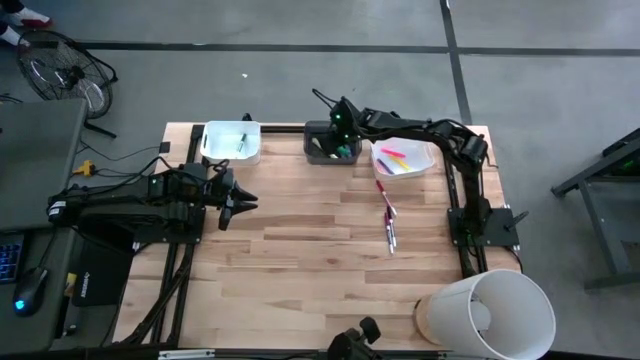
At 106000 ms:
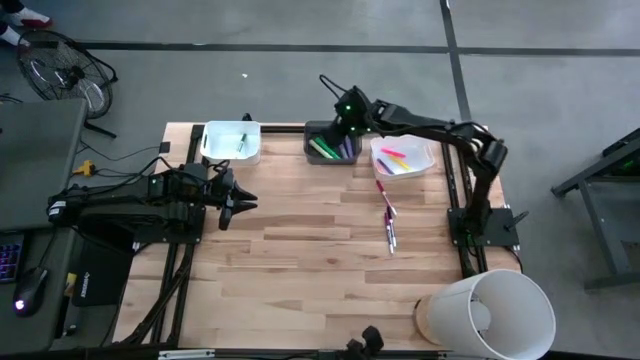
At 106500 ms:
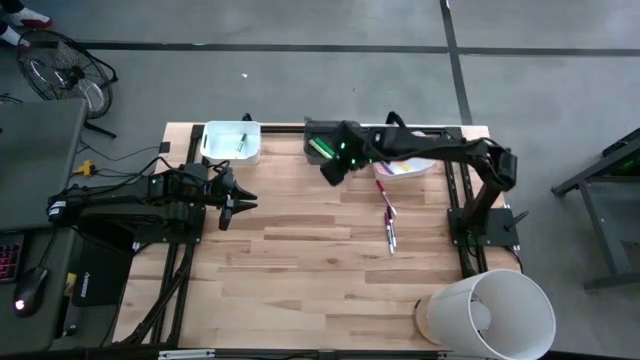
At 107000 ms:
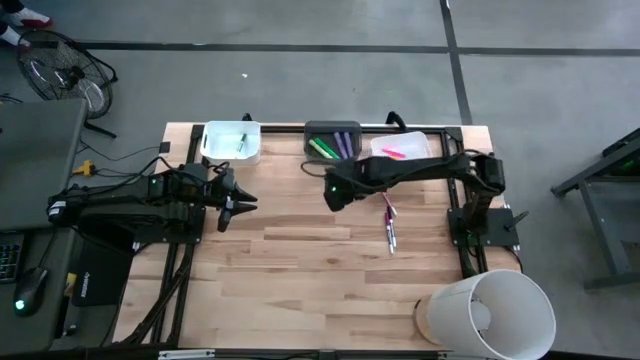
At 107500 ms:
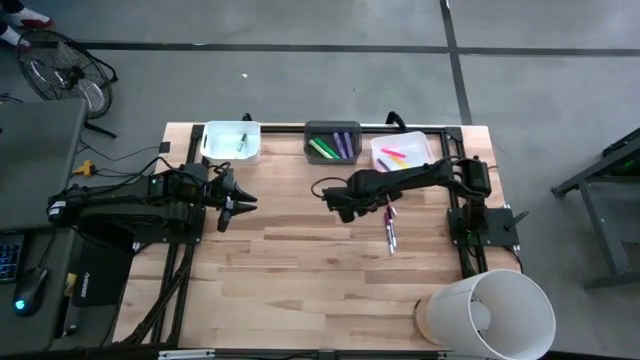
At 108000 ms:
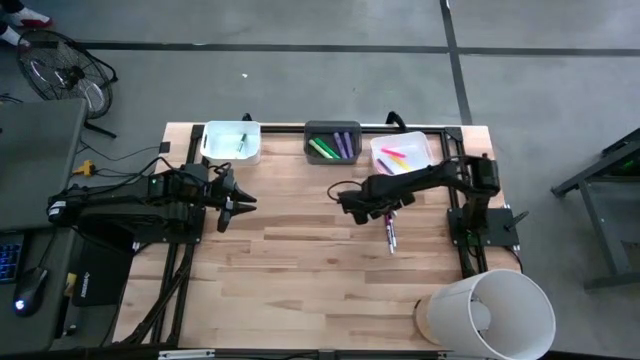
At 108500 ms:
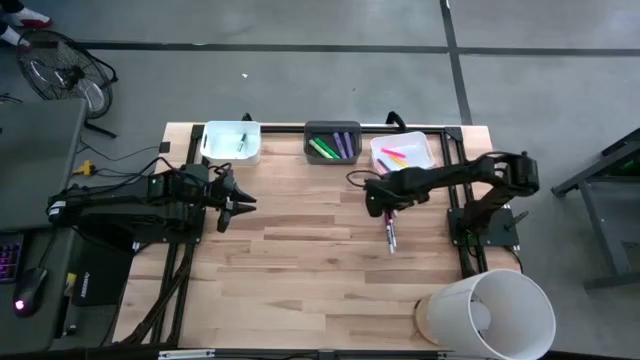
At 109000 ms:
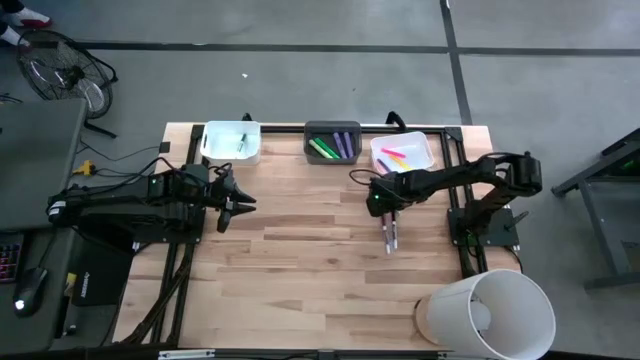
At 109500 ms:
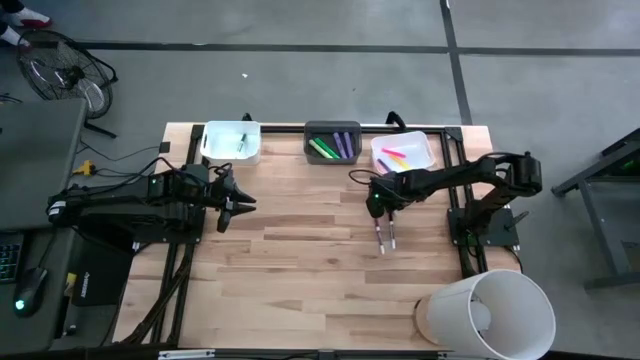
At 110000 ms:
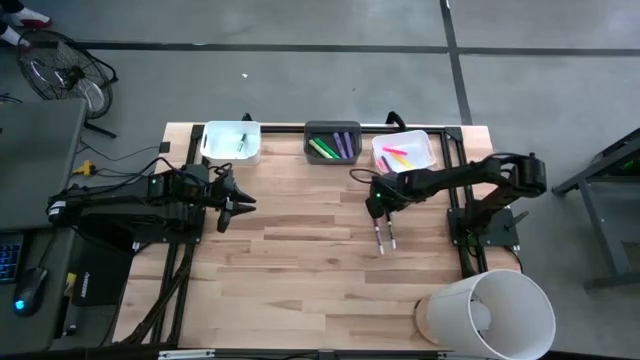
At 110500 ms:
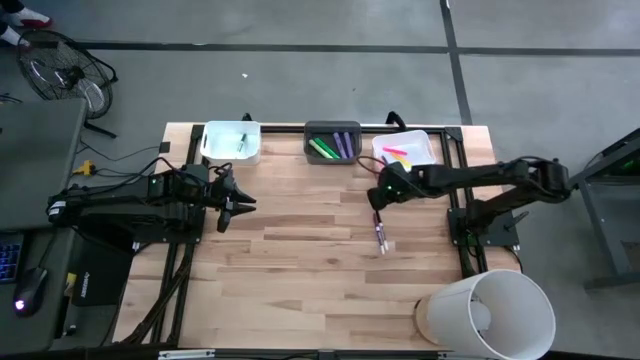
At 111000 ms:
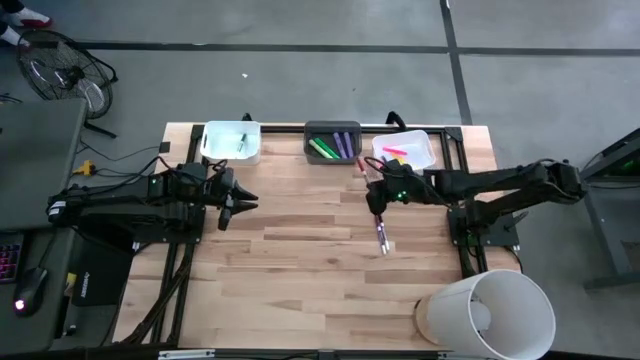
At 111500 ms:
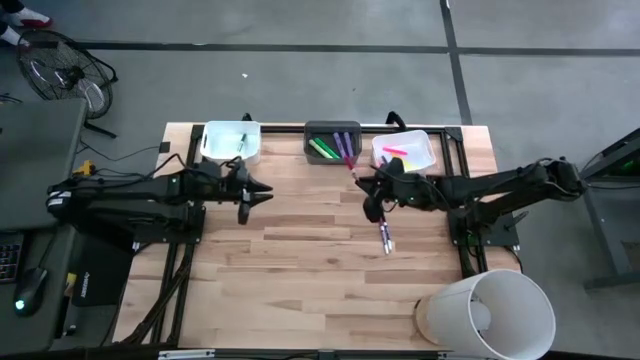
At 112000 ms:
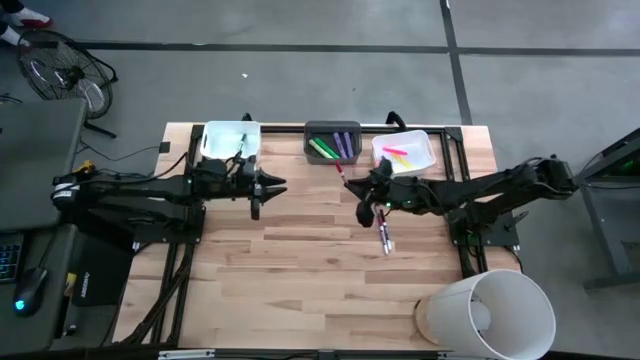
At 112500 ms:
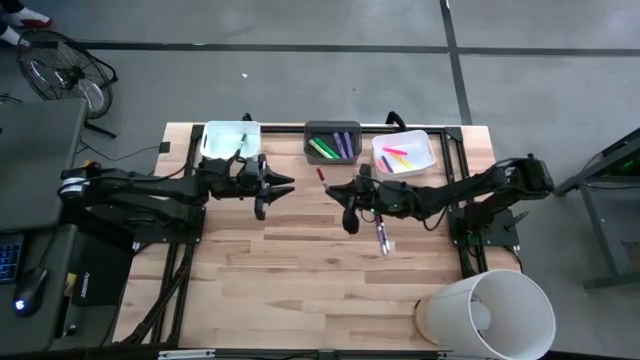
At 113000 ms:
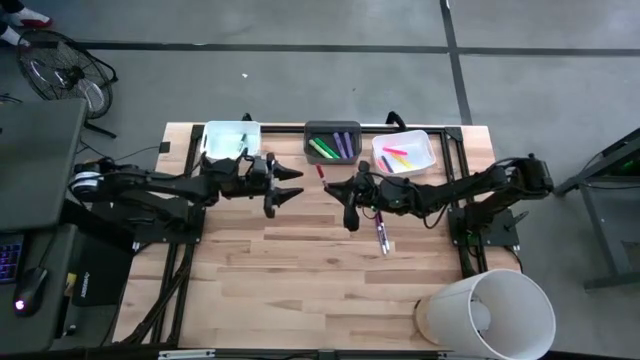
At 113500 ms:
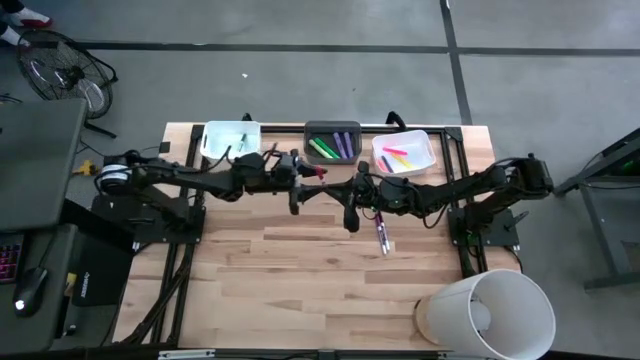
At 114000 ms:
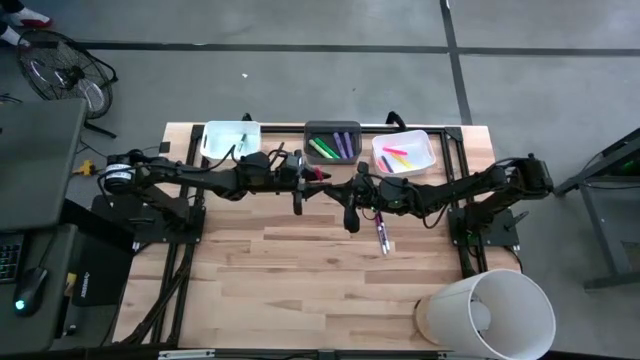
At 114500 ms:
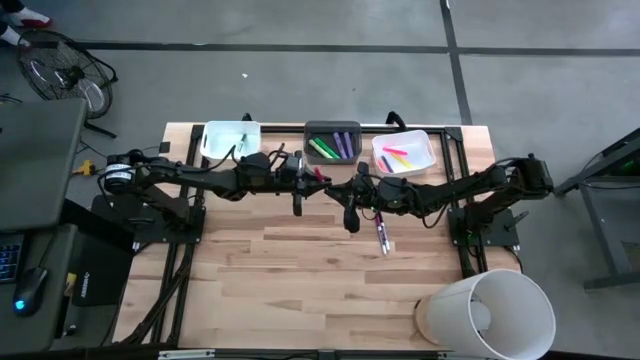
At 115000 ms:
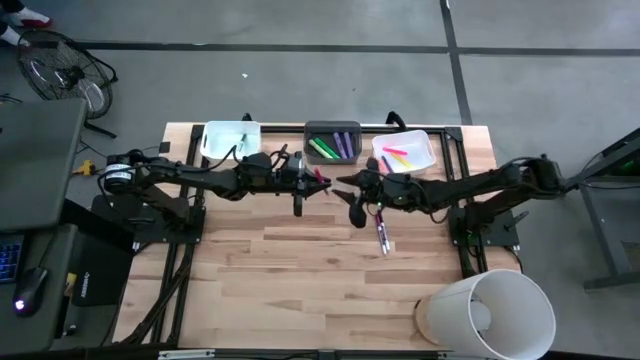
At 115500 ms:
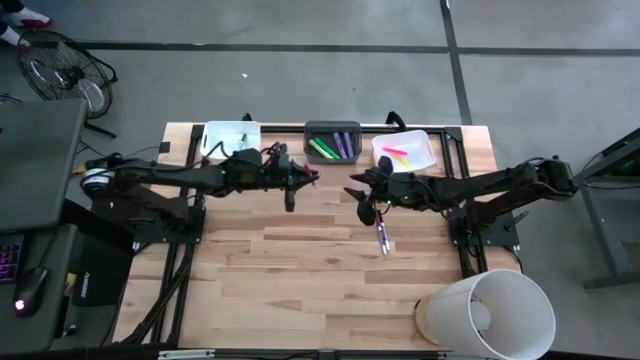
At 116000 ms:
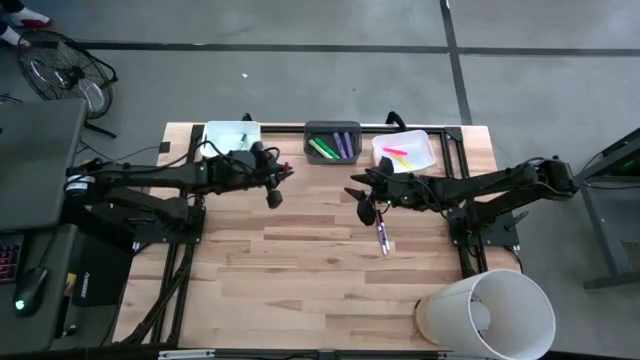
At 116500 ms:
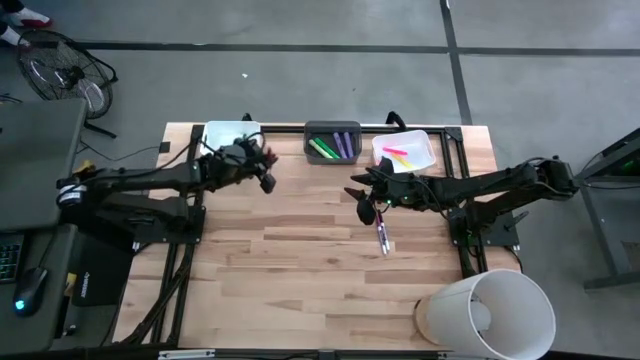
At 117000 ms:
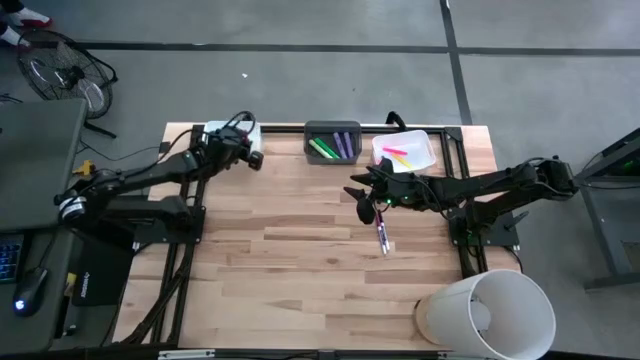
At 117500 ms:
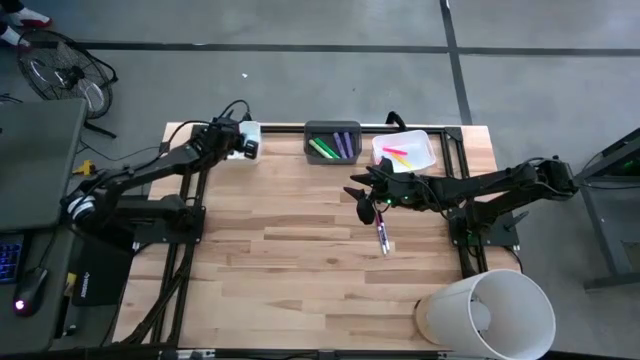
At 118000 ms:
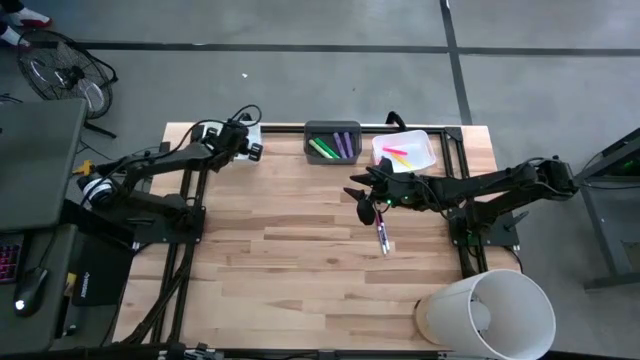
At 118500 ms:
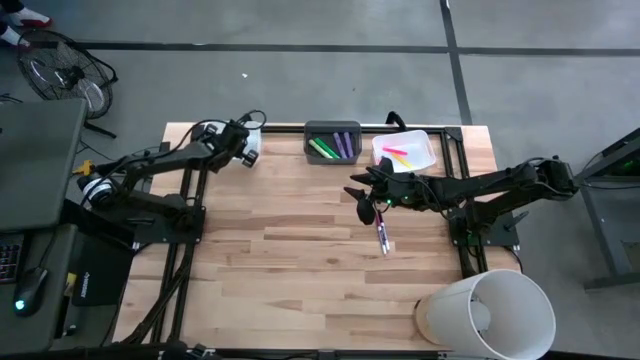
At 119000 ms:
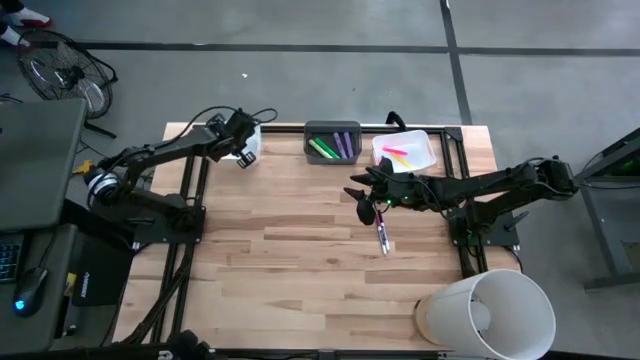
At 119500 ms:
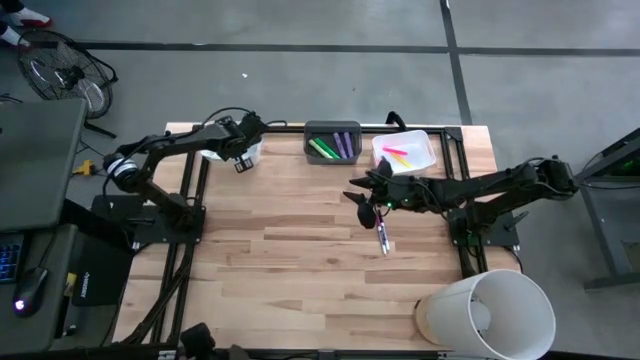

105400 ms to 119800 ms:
Task: Pick & Place Markers
Put the red highlighter pen into the left white bin

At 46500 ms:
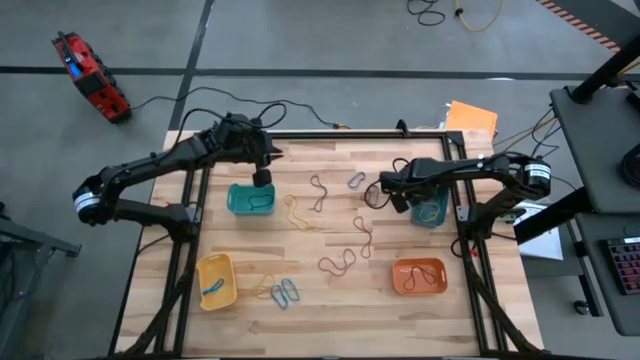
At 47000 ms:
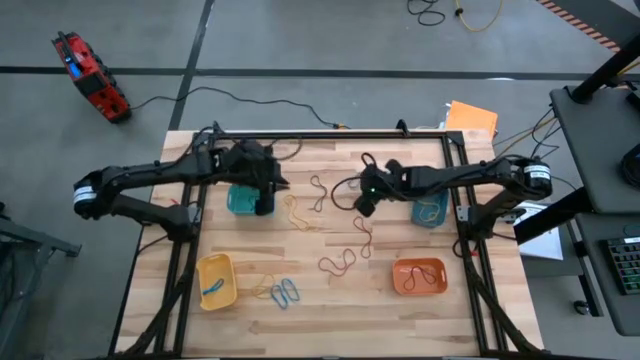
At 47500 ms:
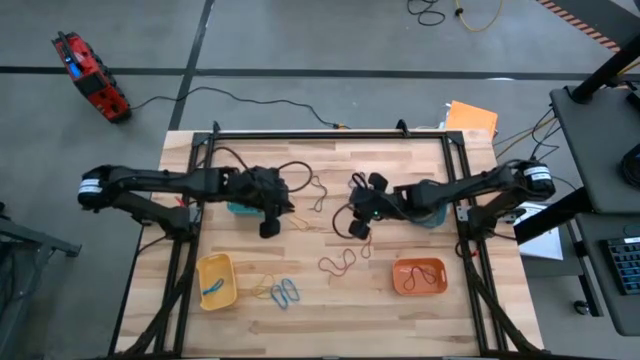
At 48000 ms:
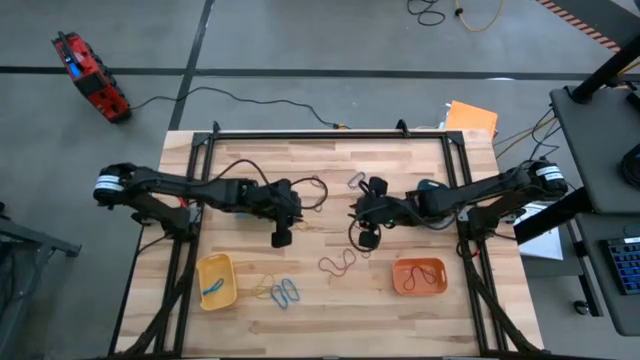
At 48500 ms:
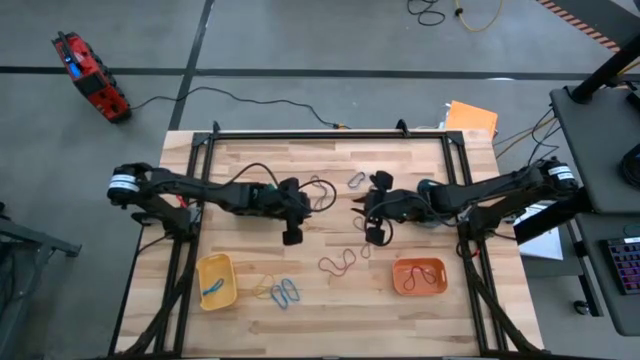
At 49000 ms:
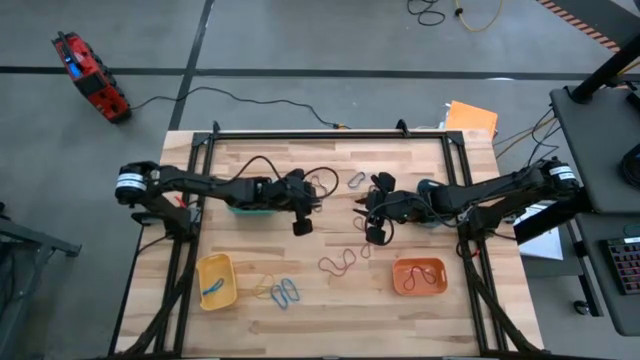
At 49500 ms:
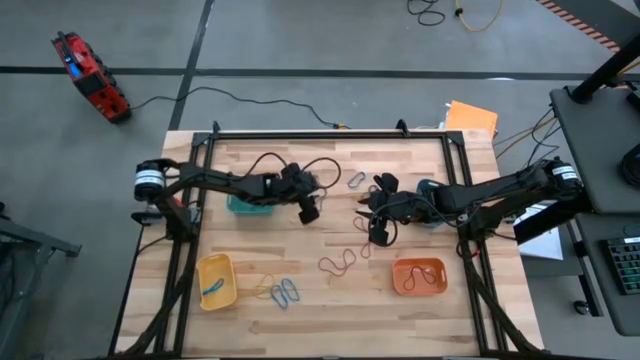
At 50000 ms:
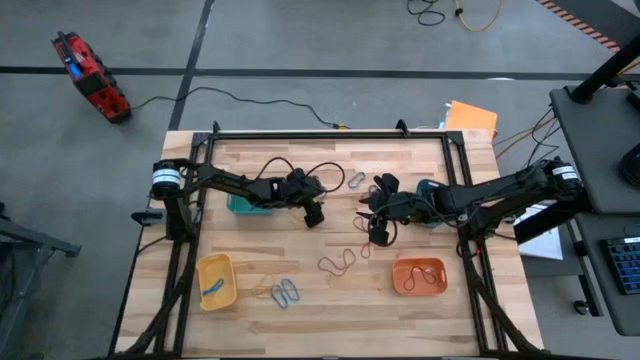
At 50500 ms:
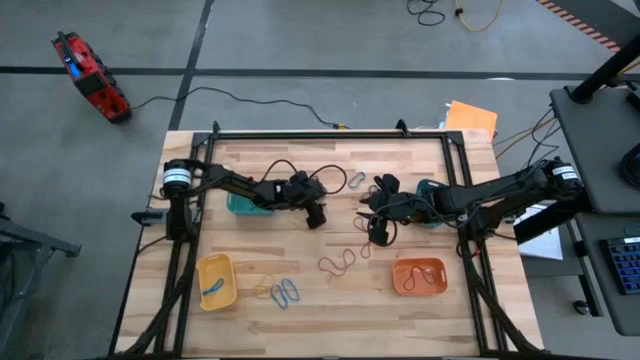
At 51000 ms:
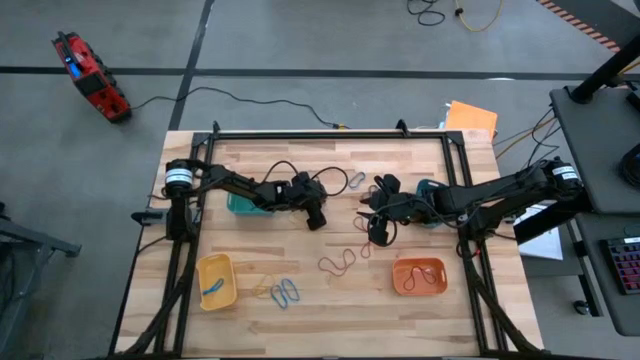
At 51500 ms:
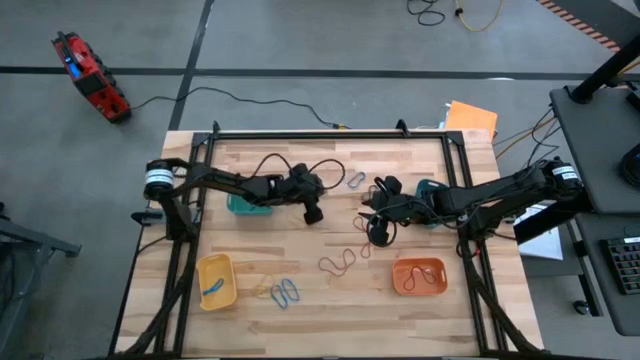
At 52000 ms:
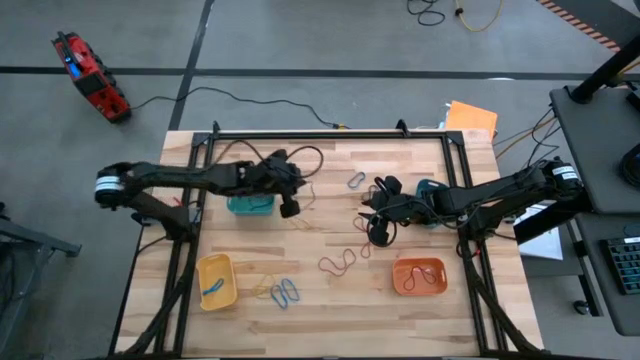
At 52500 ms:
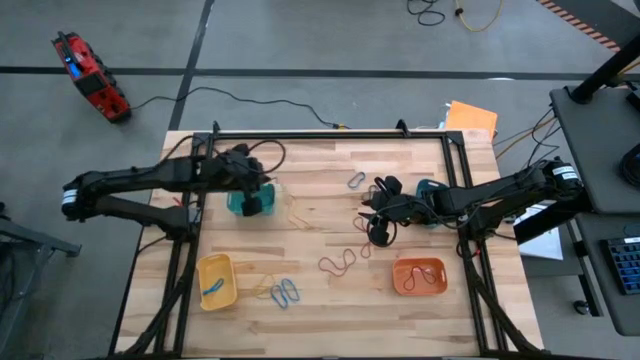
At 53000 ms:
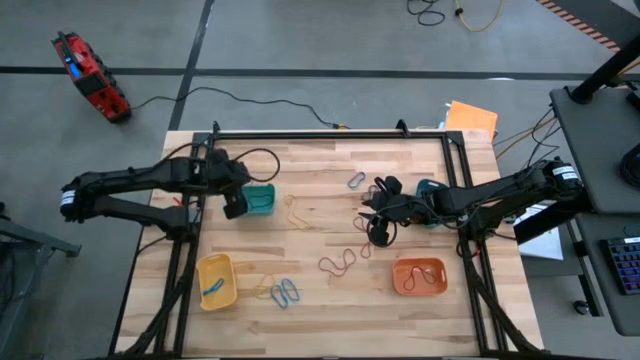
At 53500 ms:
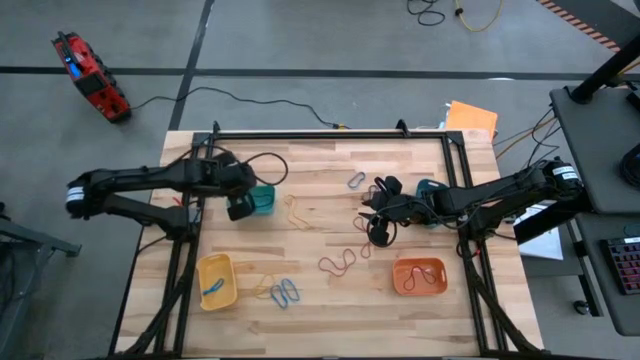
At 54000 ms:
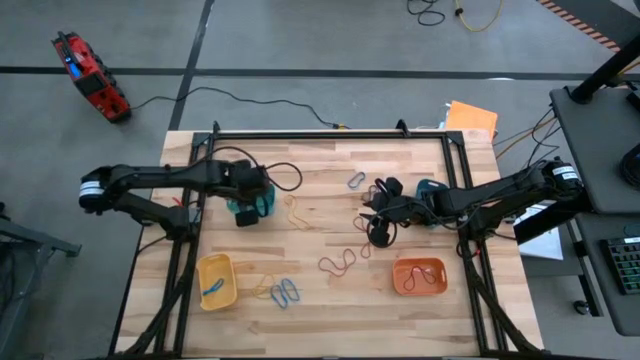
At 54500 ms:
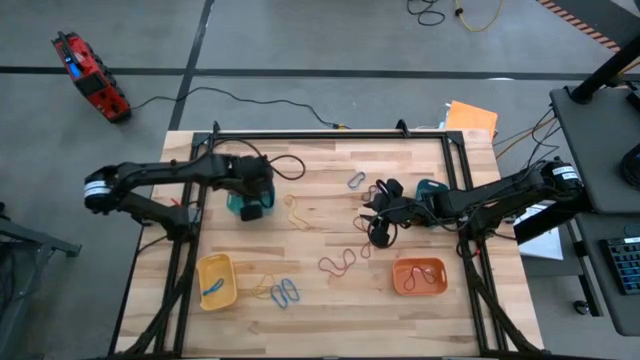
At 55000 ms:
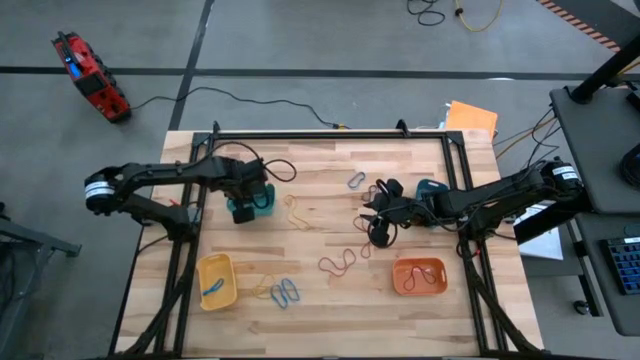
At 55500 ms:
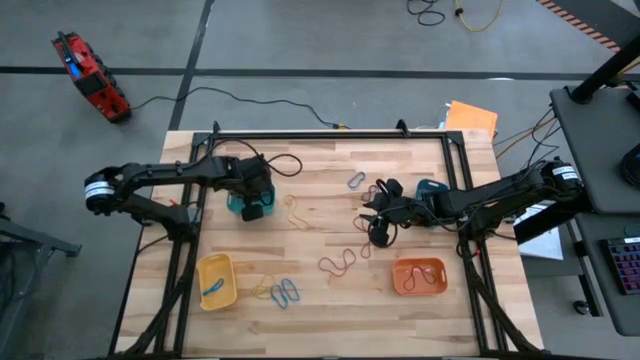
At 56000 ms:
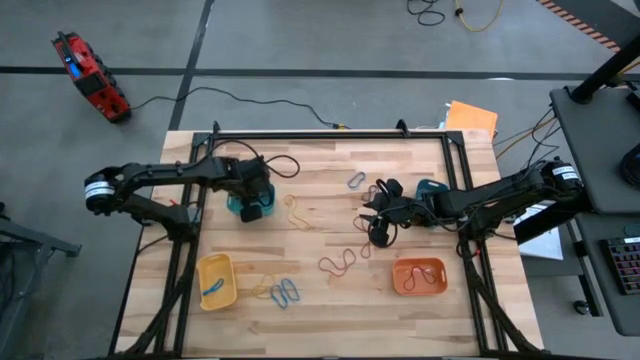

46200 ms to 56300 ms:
Task: Sort rubber bands into baskets
Put the brown rubber band into the green bin
